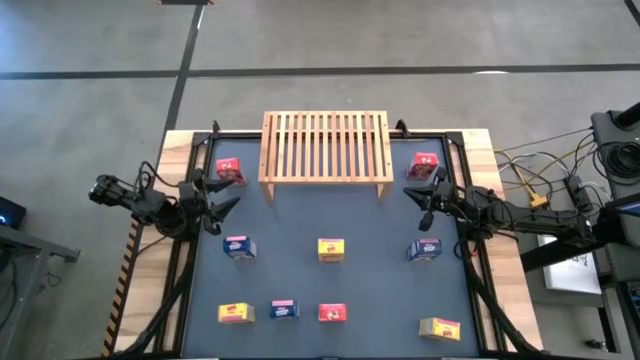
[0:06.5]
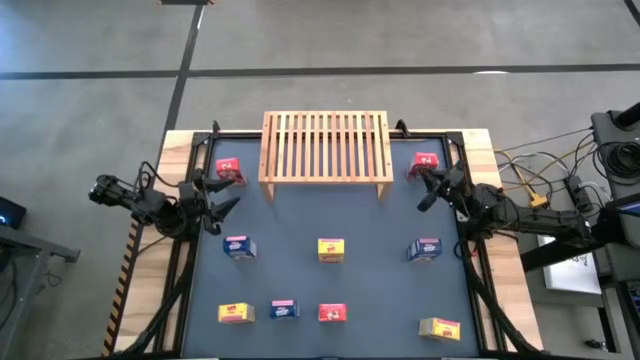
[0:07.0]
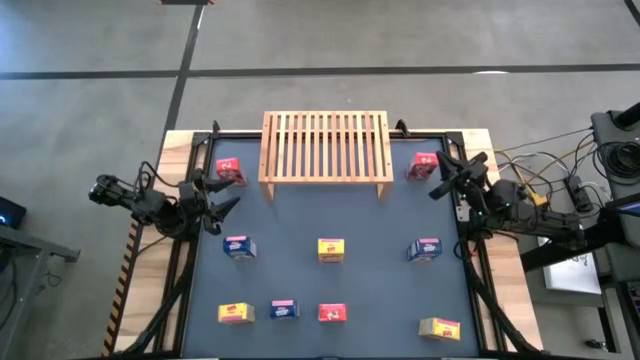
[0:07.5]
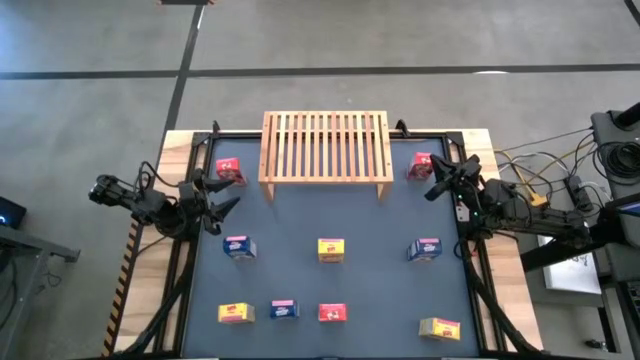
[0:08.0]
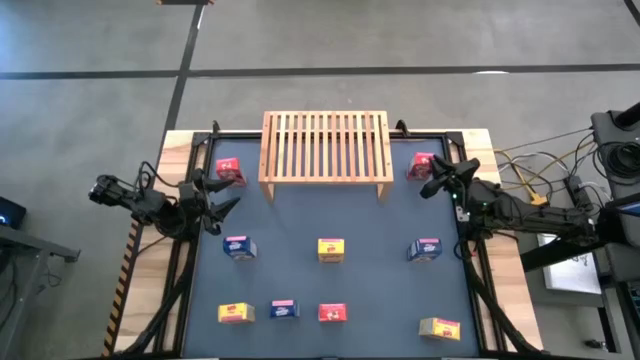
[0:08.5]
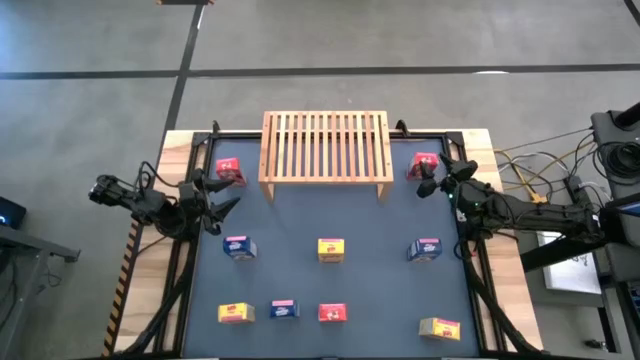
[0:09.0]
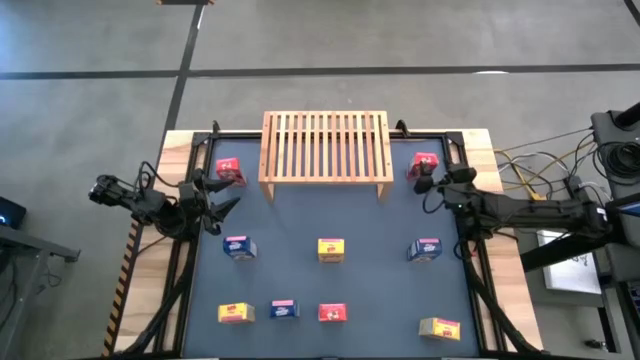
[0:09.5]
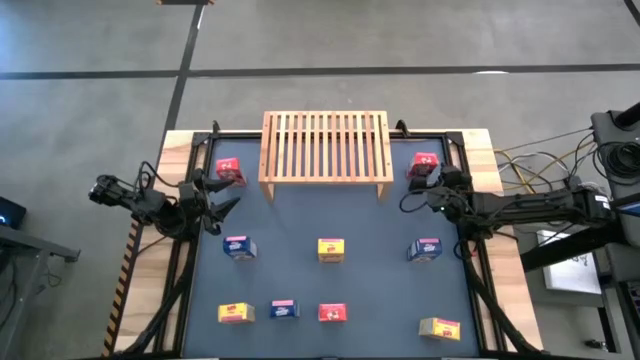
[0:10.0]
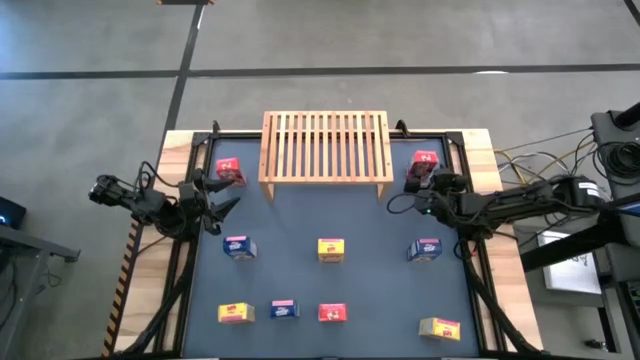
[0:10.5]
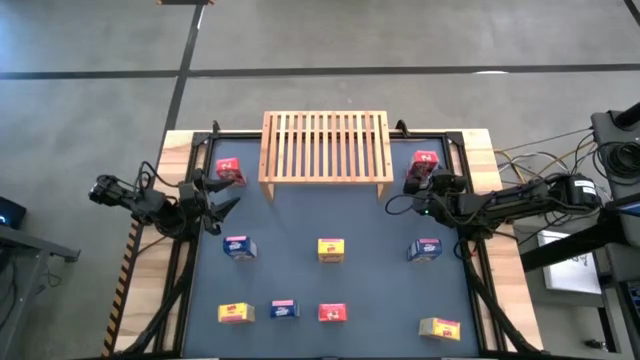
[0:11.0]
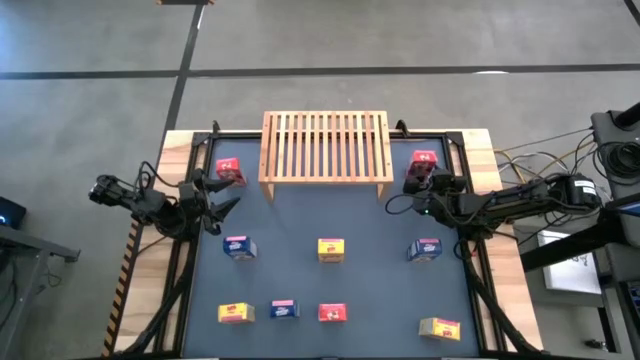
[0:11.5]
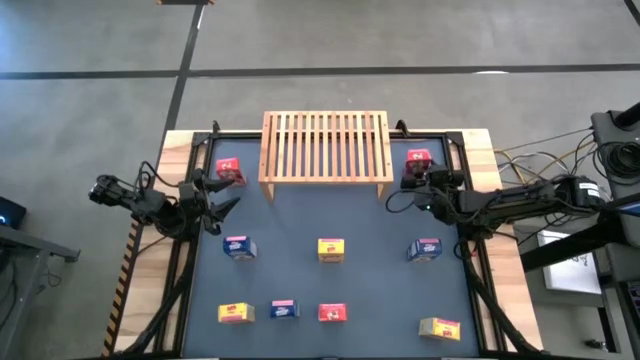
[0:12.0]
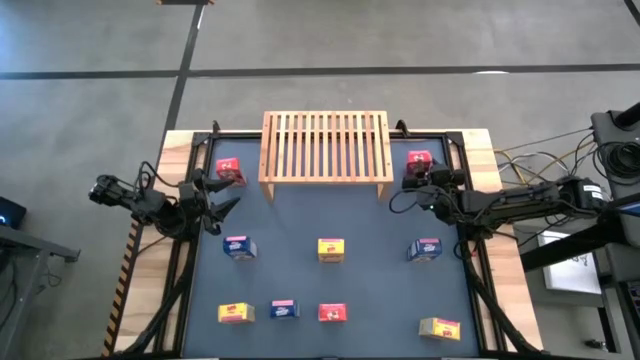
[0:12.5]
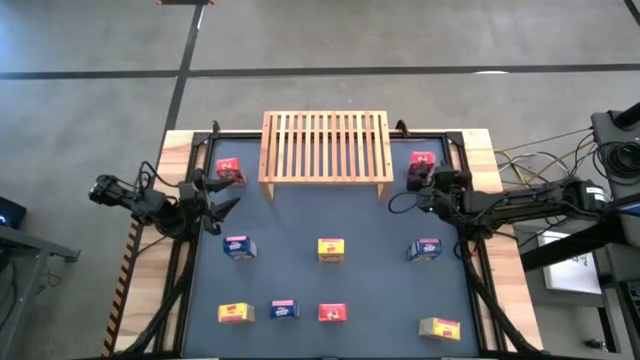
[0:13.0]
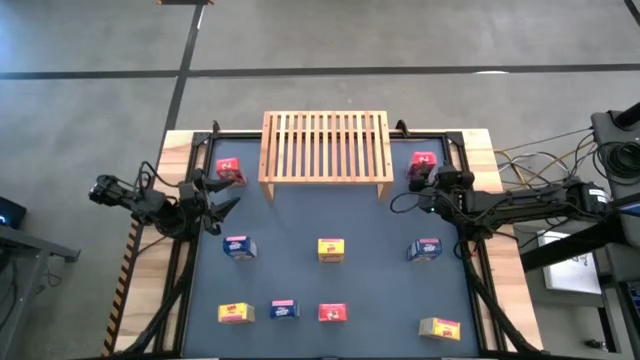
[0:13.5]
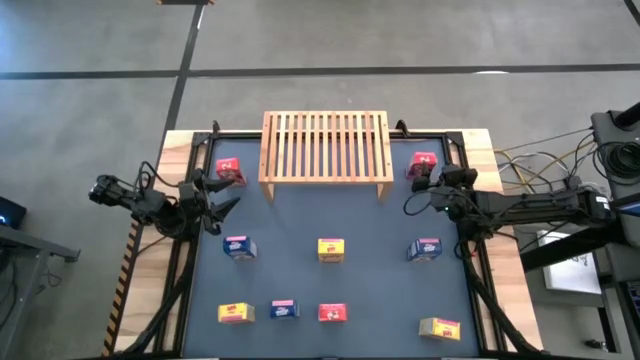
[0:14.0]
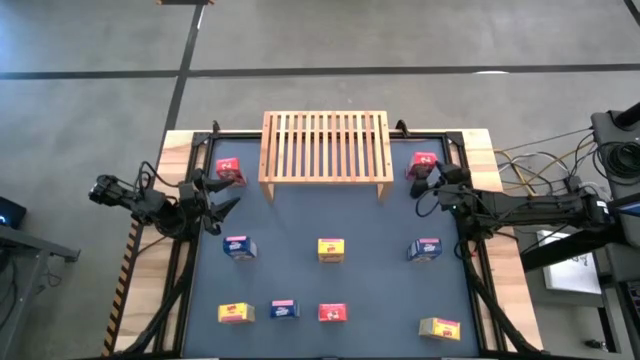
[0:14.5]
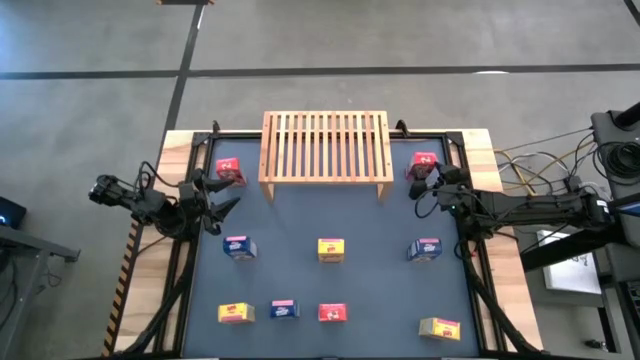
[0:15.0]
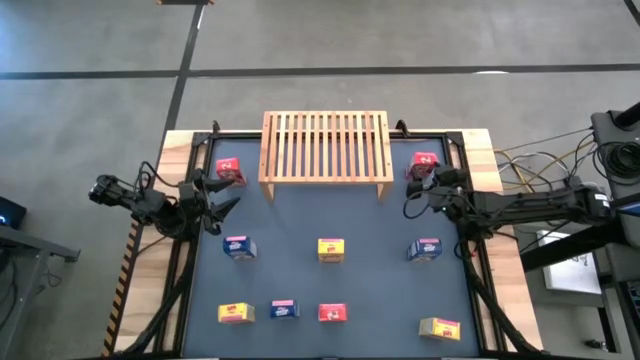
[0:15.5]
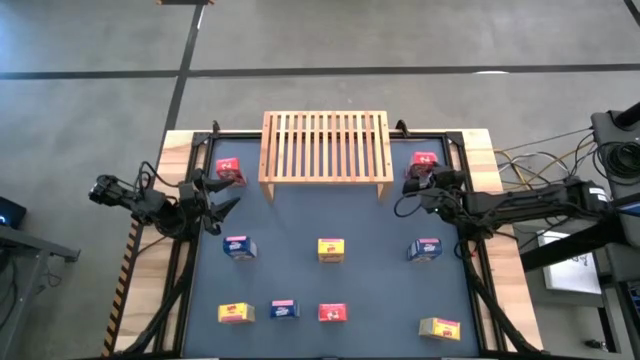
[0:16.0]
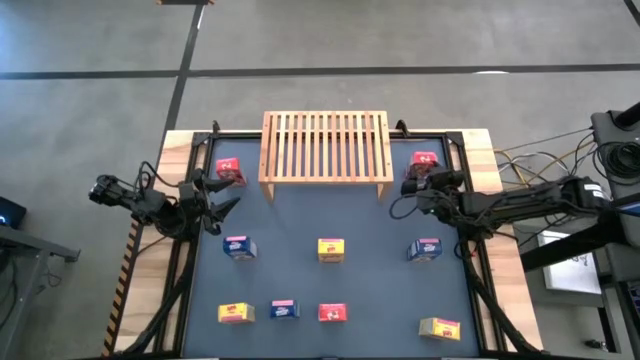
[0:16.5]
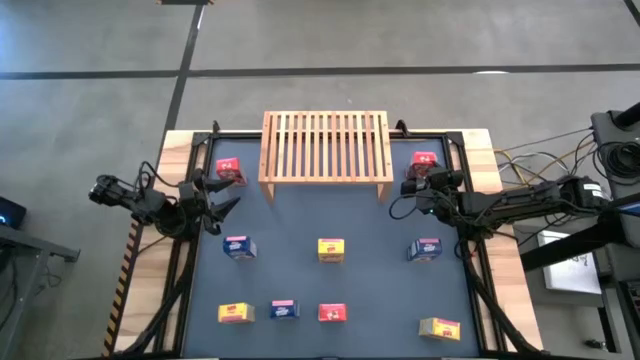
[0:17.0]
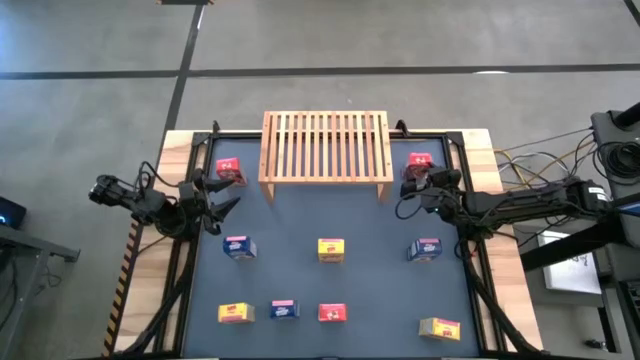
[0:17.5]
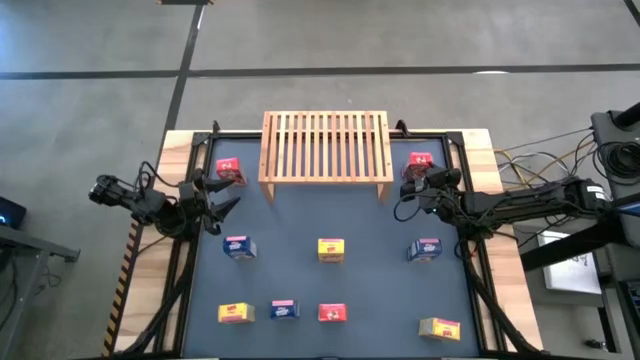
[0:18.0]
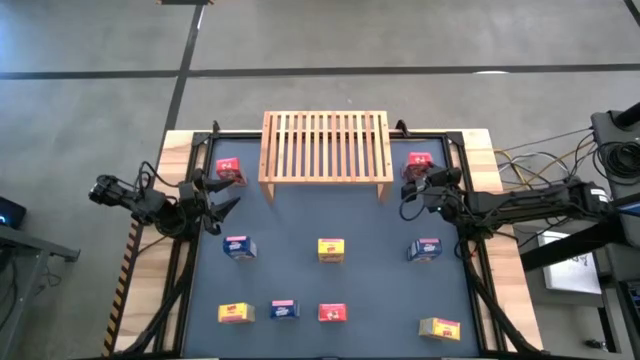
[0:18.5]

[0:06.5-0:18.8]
Task: Stack cereal on shelf
Put the top right red cereal box on the shelf

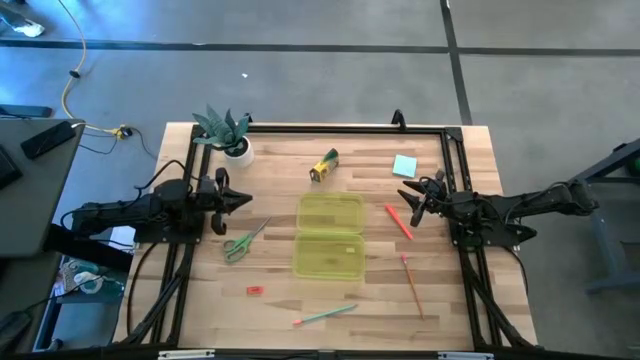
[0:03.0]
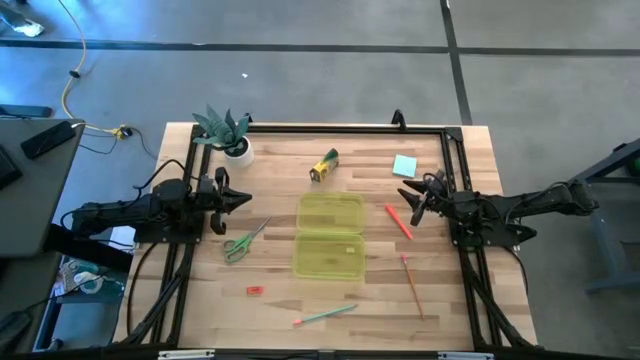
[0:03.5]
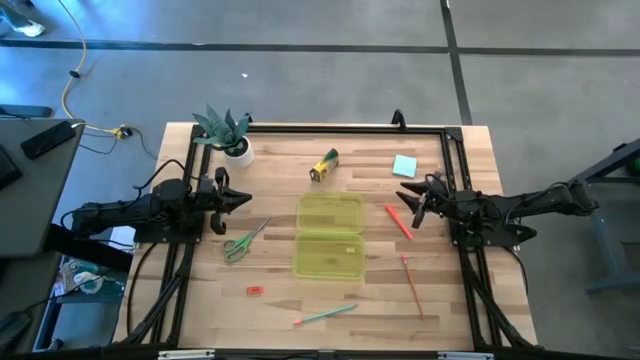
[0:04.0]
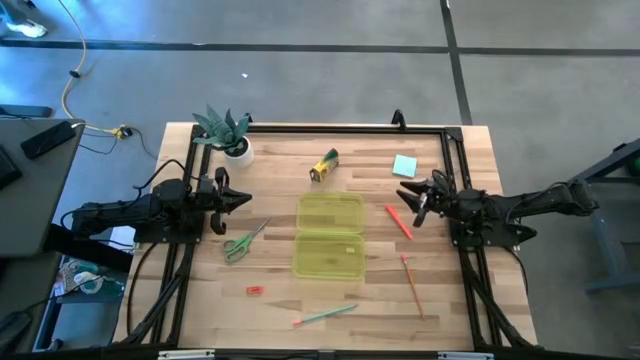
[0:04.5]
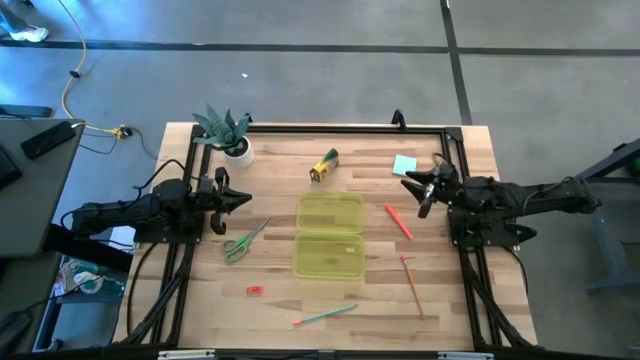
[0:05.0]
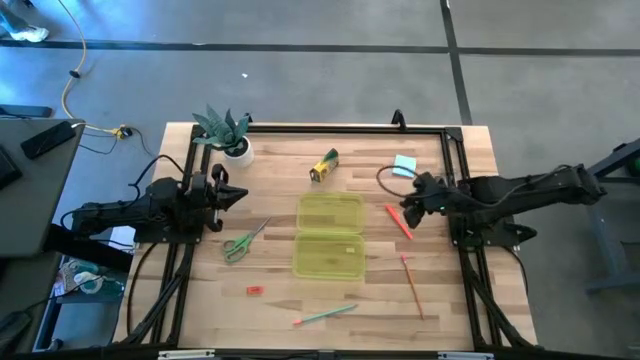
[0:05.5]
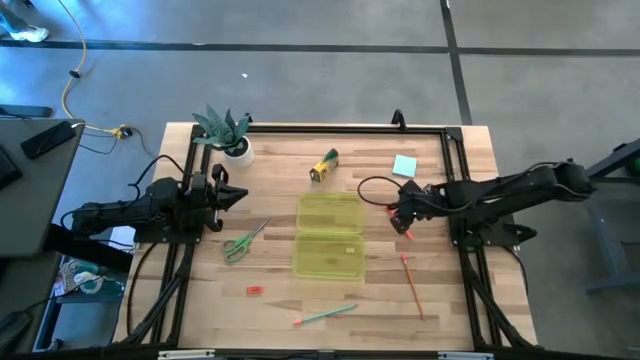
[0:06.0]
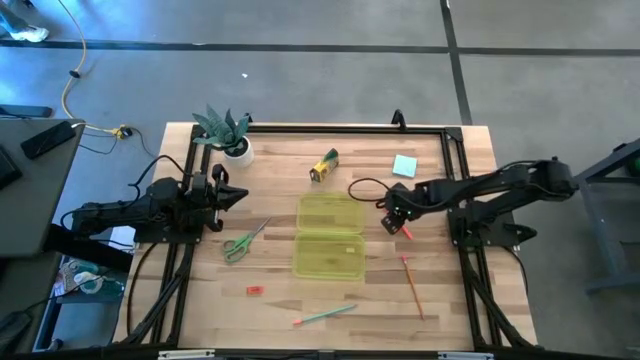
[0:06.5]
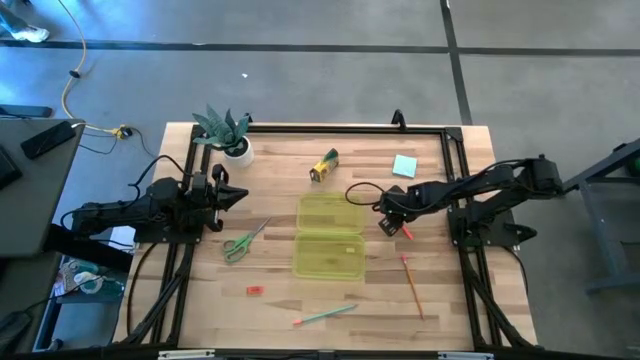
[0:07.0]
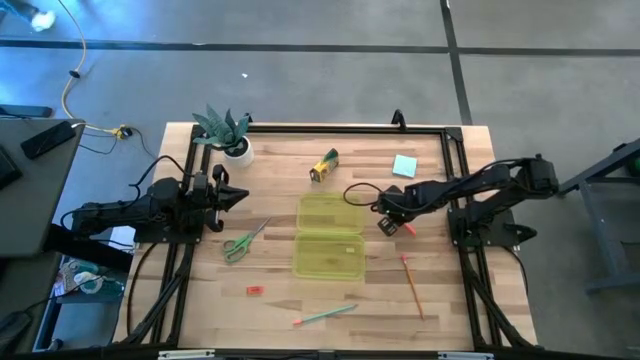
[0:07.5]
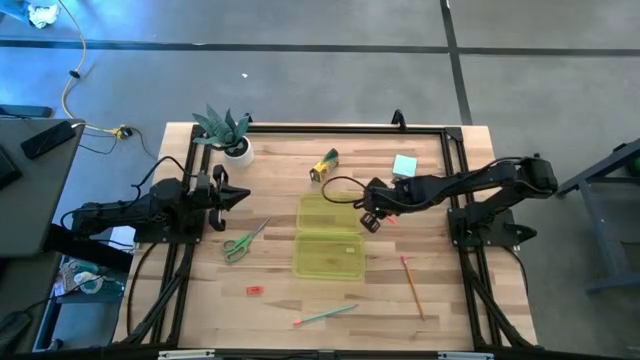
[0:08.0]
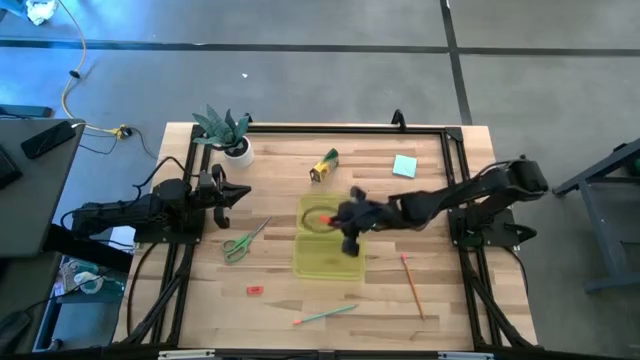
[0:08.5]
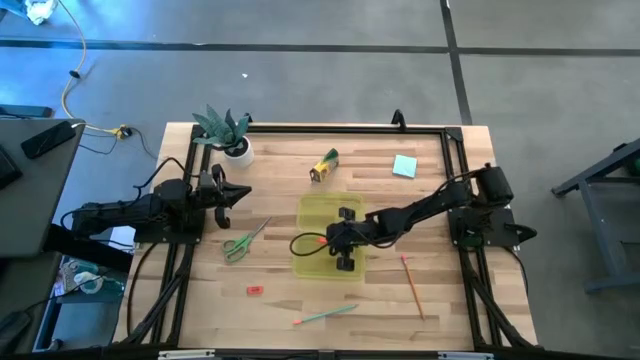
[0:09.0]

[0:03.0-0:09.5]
Task: Pack school essentials
Put the orange pen into the yellow box
